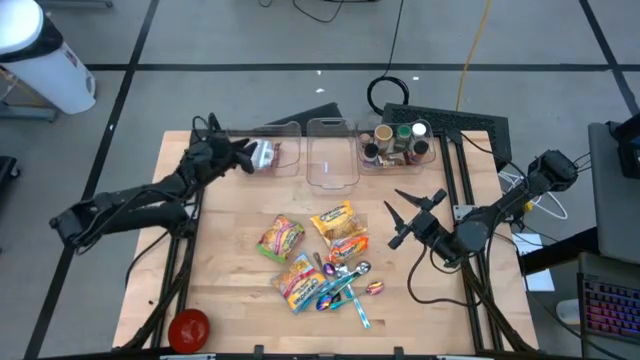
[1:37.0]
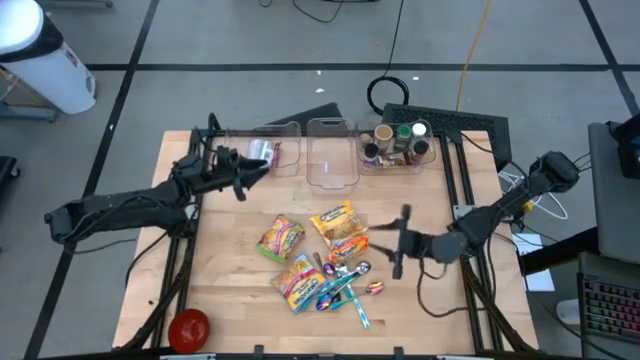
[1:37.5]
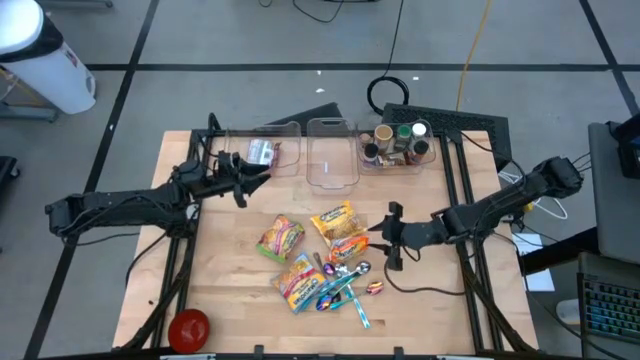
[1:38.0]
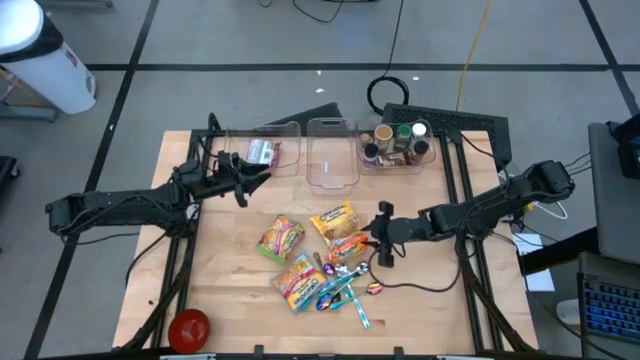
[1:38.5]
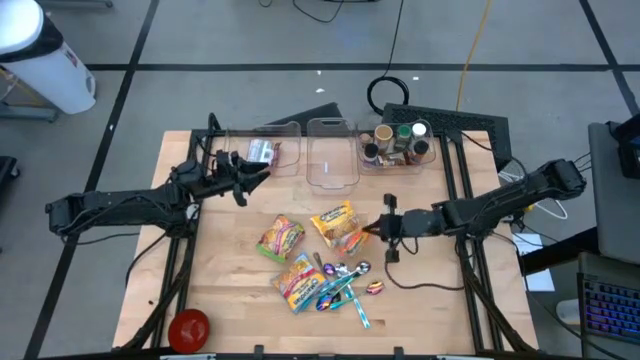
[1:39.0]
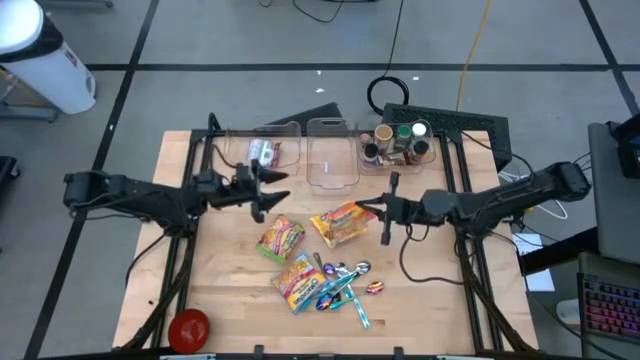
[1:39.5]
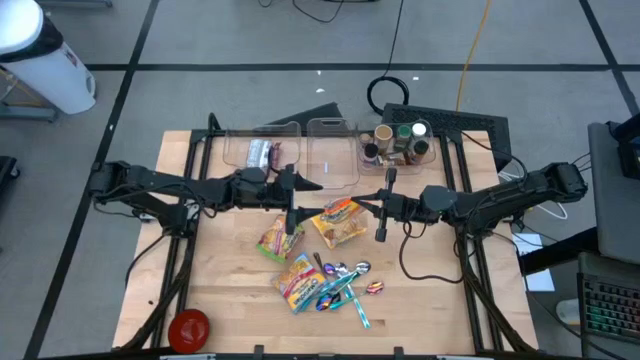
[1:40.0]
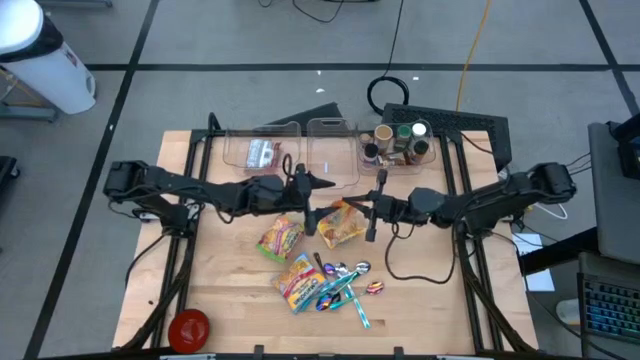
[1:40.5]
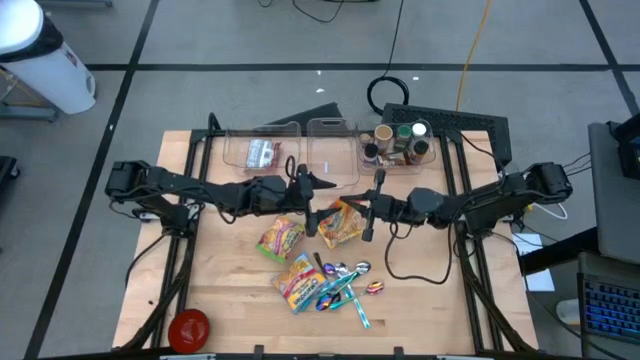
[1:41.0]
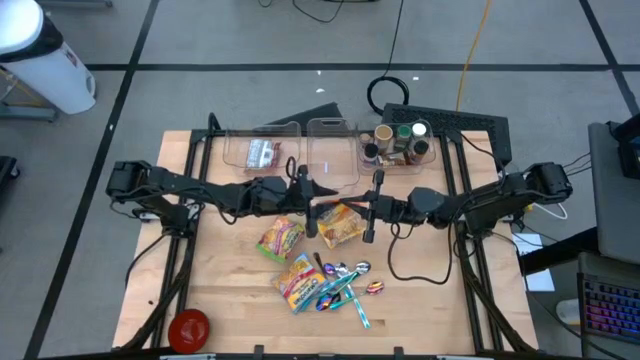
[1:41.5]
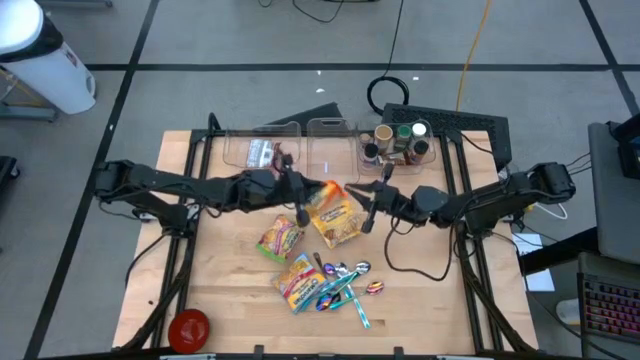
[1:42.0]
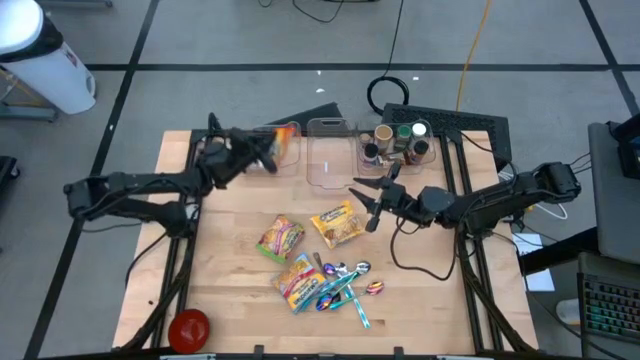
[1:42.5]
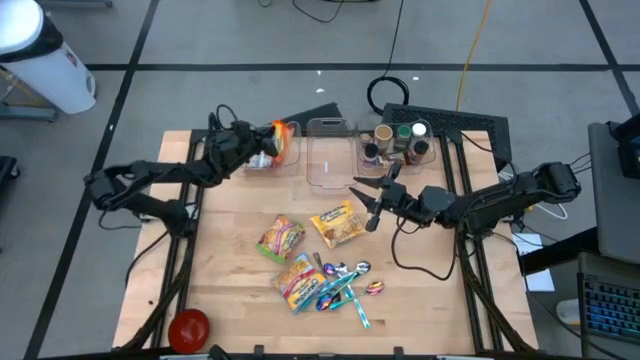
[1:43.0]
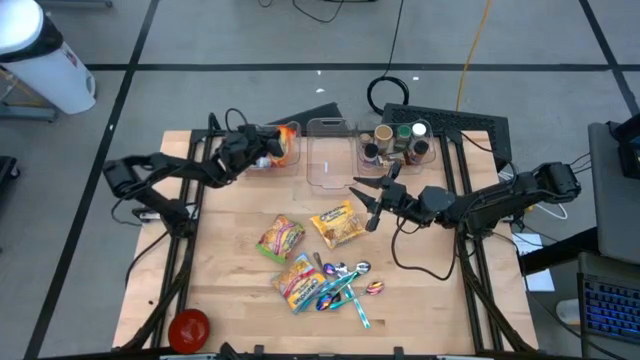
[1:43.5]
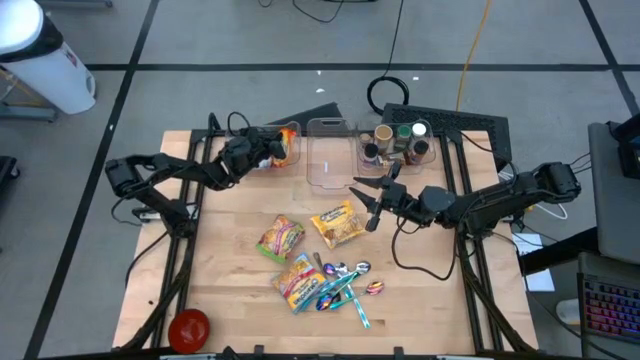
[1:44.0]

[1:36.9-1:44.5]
Task: Pick & Place Food Item
Put the orange noodle pack into the left transparent bin

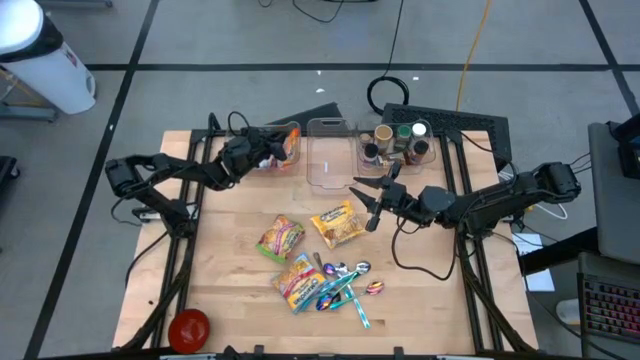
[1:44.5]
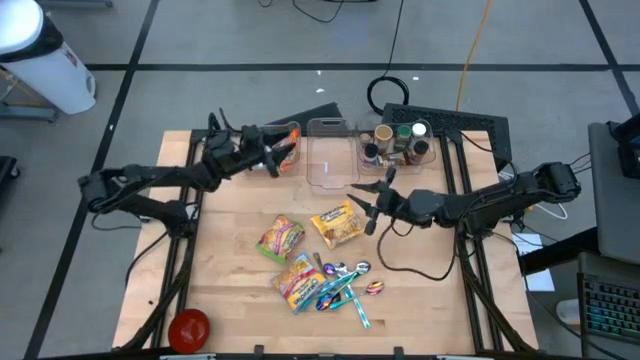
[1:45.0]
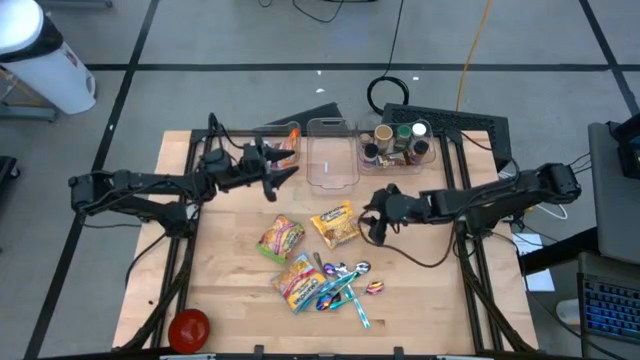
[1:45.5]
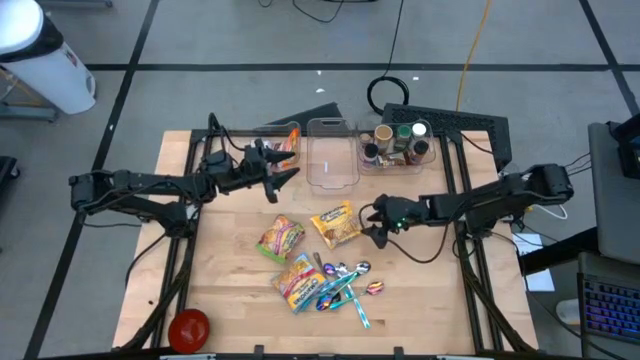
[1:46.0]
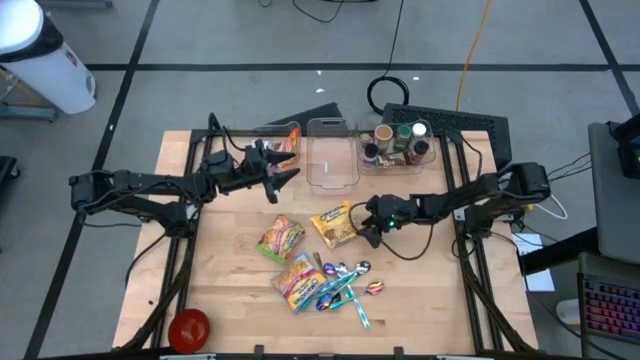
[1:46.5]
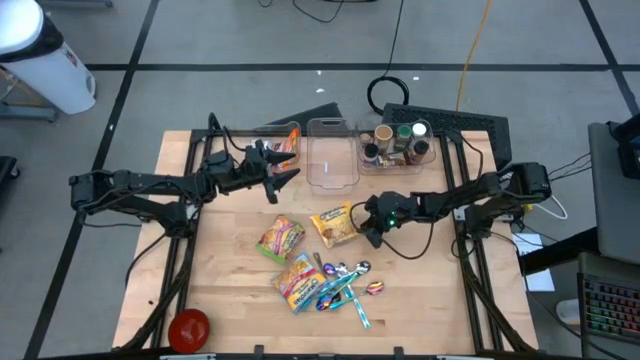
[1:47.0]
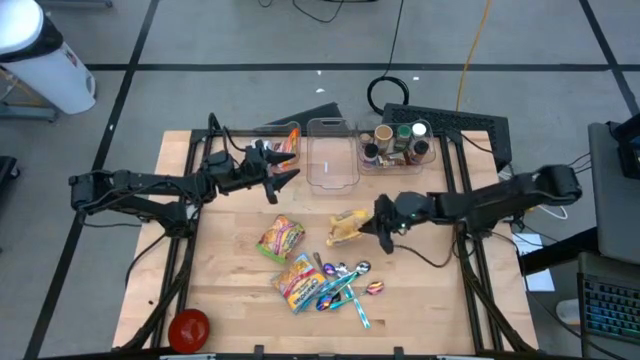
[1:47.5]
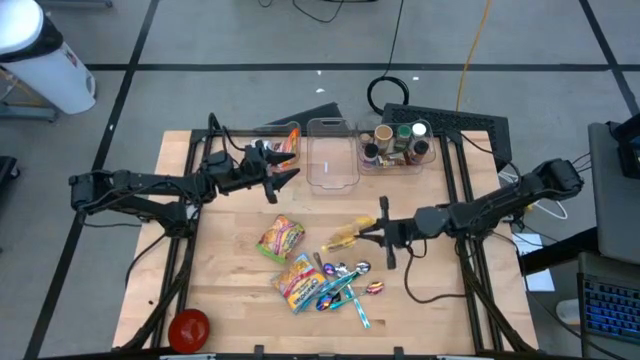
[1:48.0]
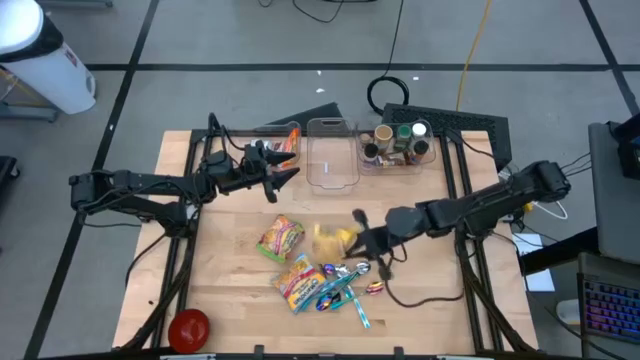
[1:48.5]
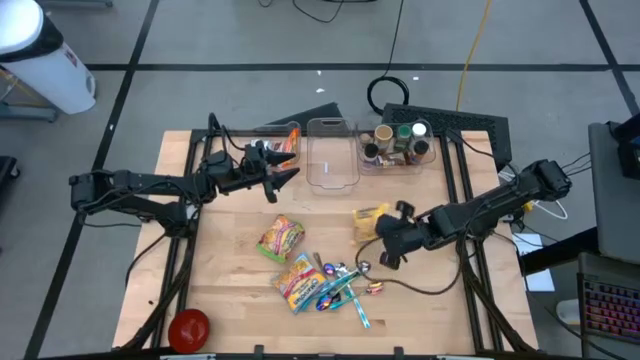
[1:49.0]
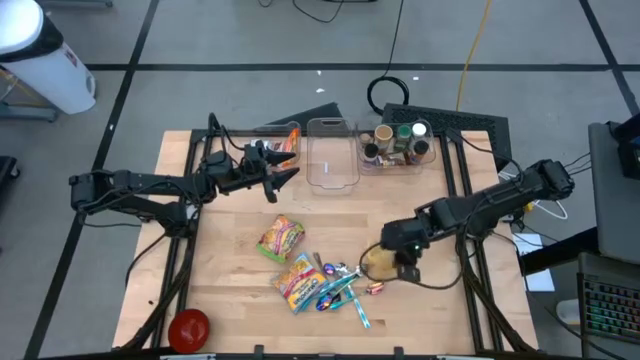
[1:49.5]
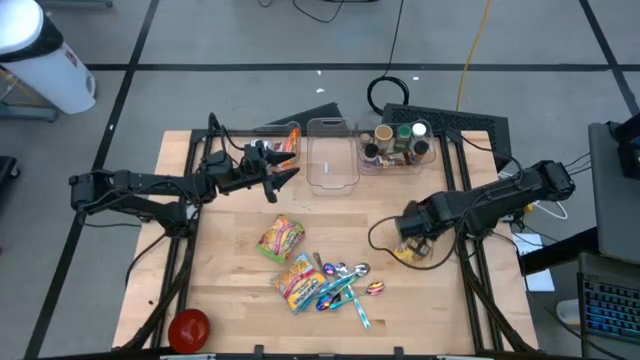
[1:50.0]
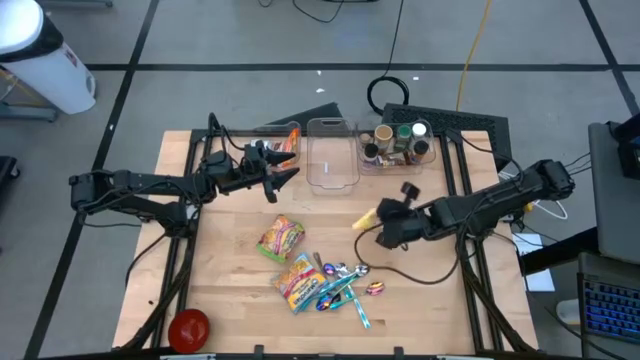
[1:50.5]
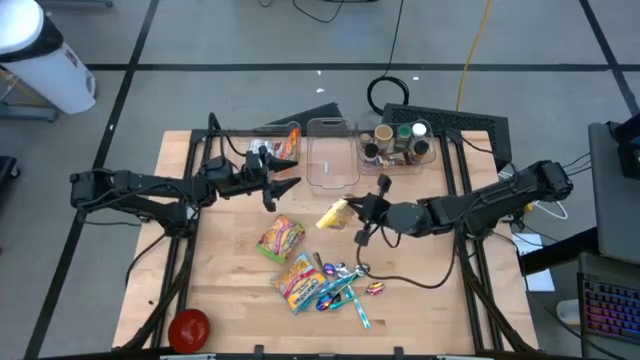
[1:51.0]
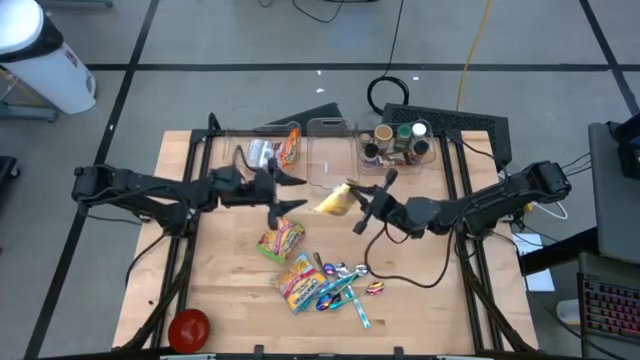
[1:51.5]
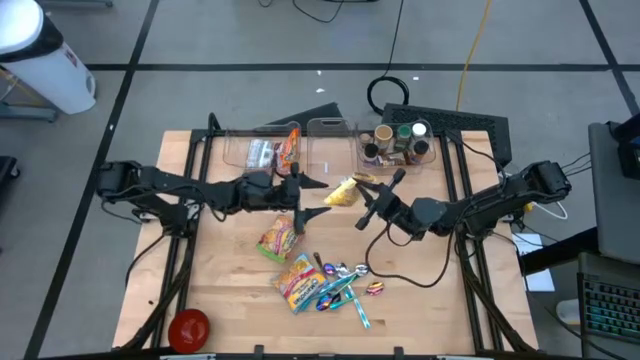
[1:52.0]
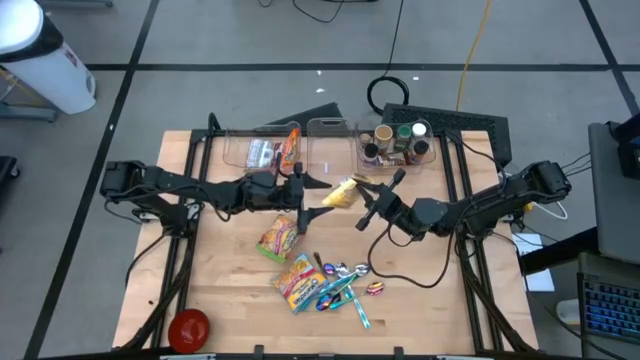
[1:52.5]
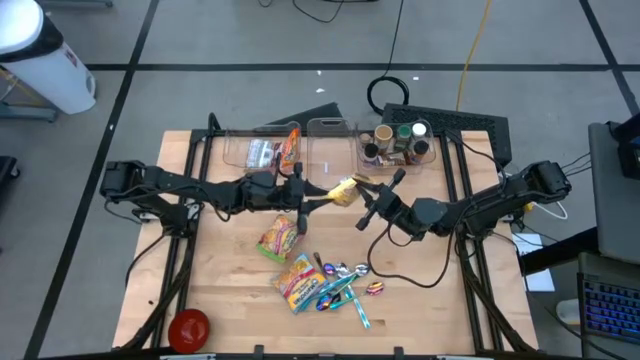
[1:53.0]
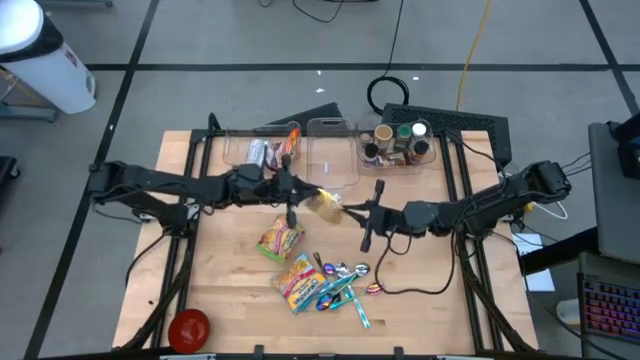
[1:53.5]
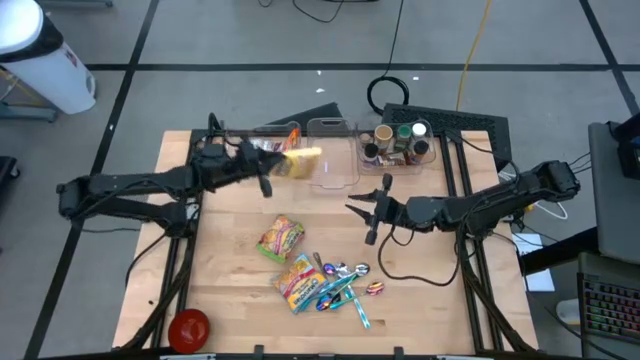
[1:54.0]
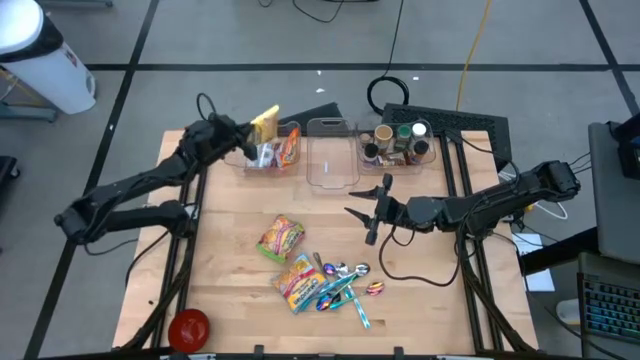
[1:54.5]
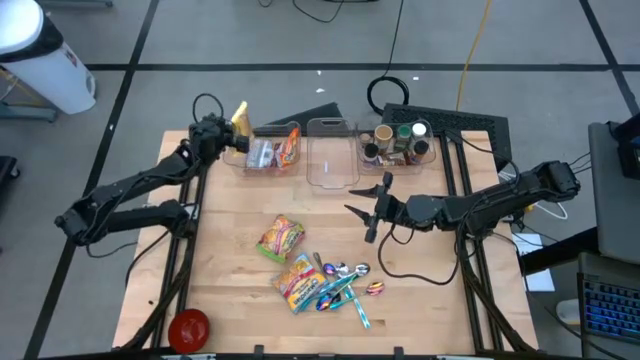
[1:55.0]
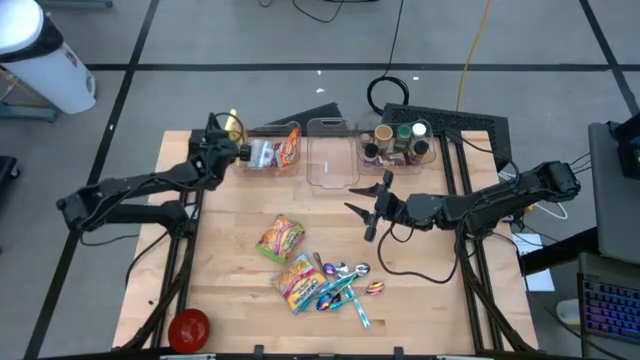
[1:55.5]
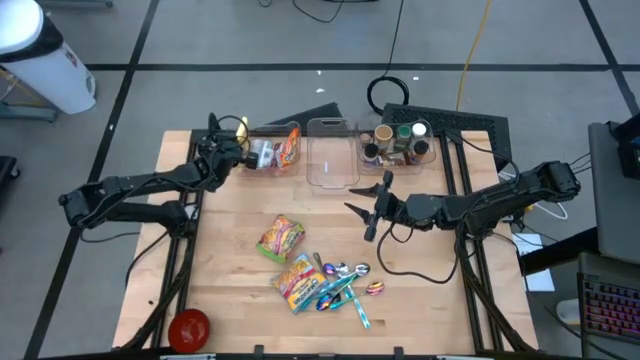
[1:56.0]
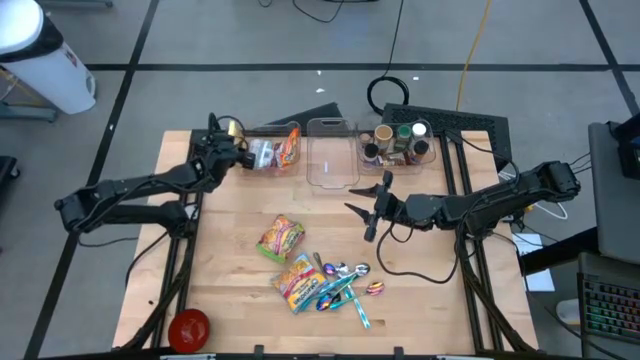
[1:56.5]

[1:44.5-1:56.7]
Put the yellow noodle pack into the left transparent bin

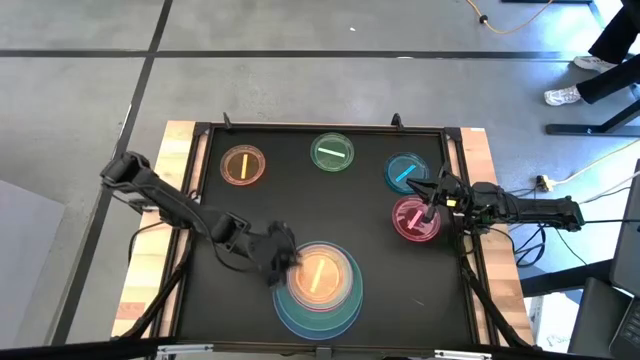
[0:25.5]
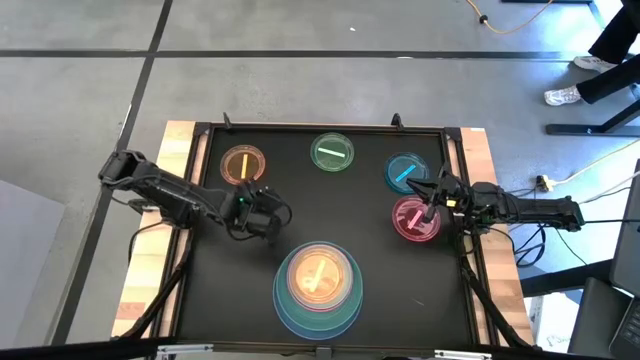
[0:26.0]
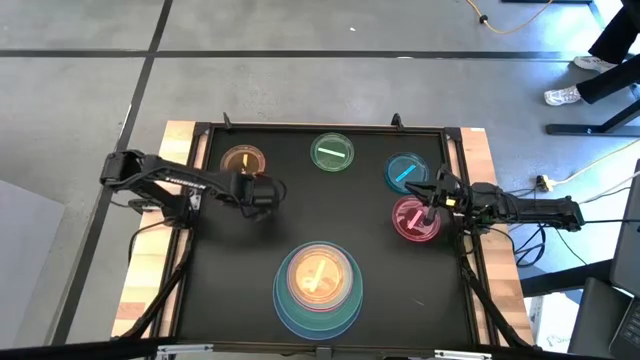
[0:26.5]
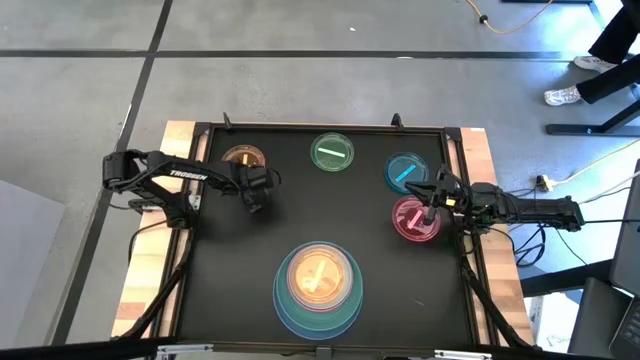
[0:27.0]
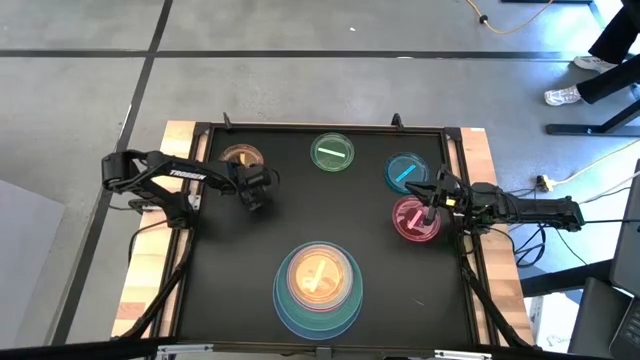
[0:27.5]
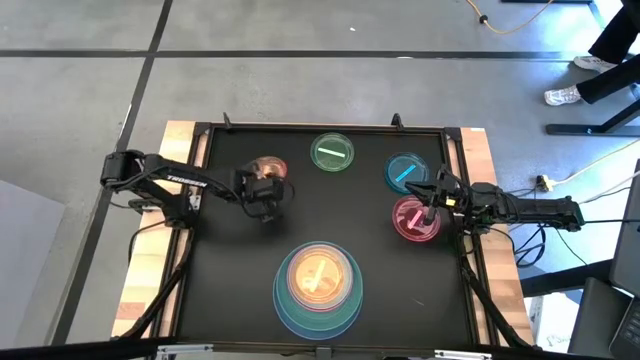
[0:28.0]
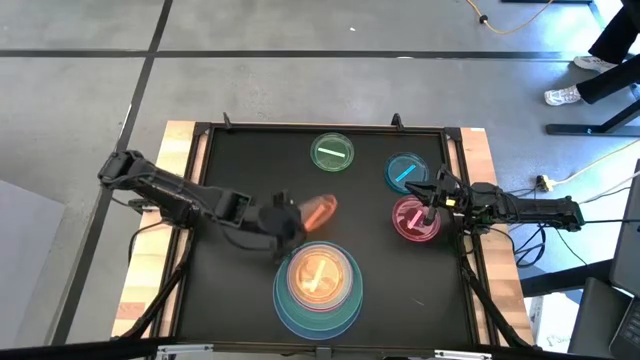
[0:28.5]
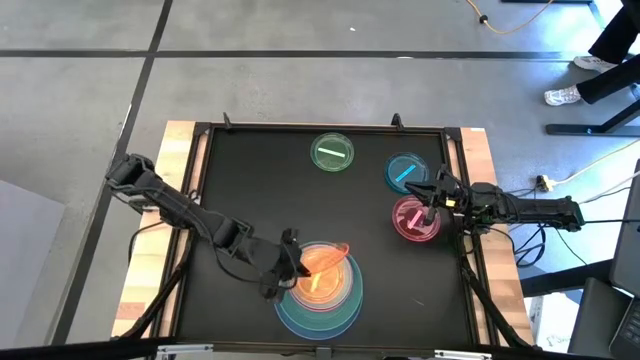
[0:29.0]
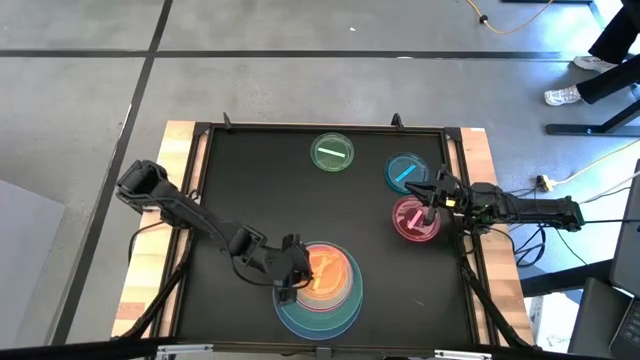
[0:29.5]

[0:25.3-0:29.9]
Task: Stack plastic plates
Stack the orange plate on the orange plate
